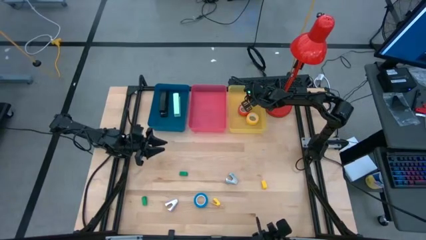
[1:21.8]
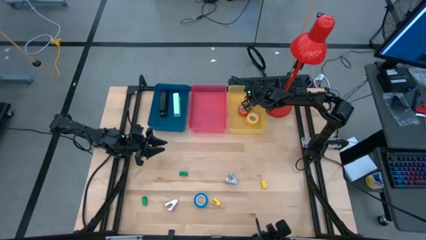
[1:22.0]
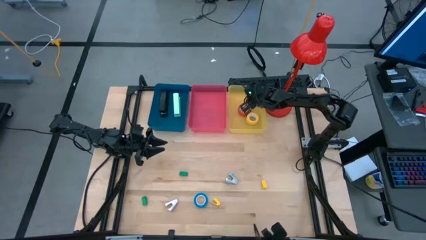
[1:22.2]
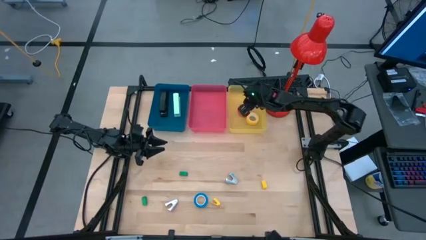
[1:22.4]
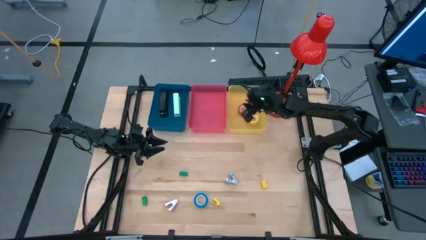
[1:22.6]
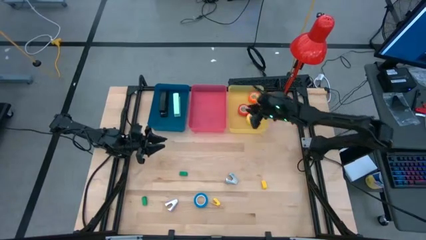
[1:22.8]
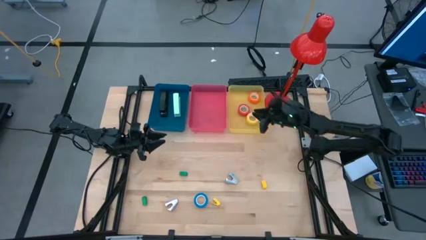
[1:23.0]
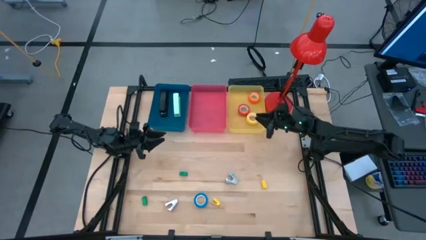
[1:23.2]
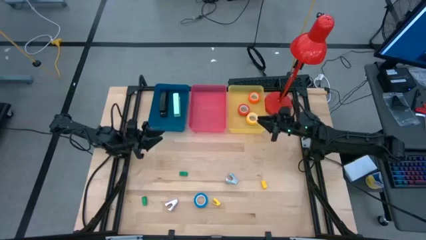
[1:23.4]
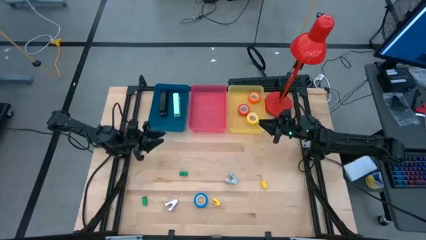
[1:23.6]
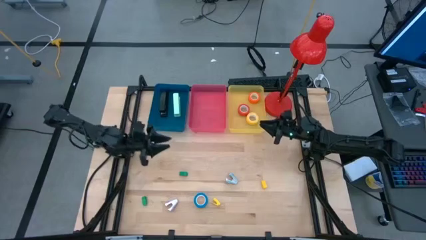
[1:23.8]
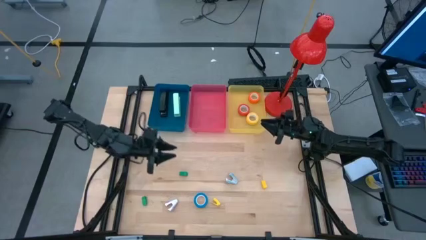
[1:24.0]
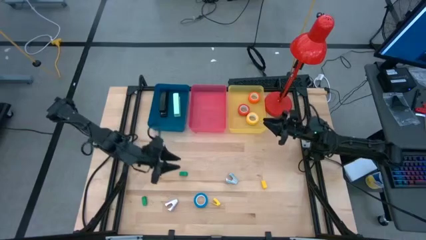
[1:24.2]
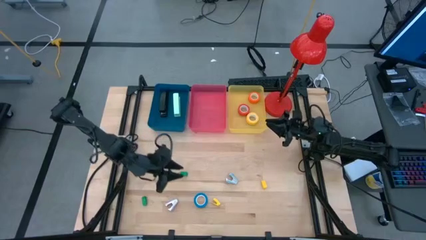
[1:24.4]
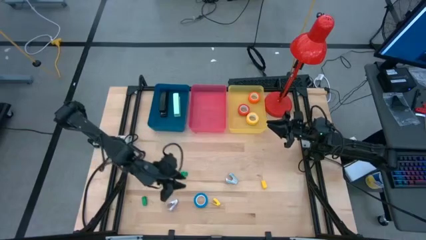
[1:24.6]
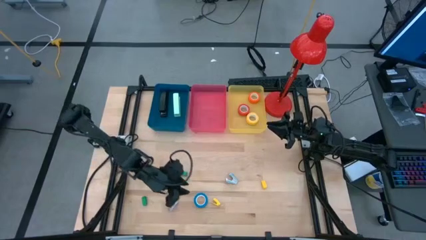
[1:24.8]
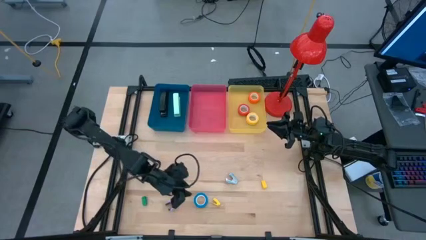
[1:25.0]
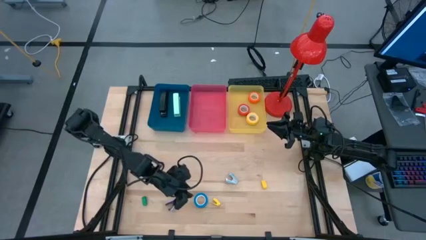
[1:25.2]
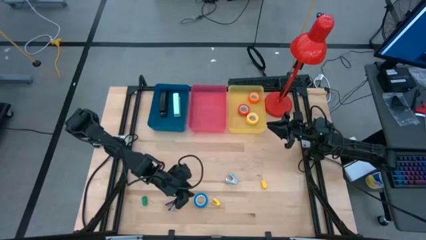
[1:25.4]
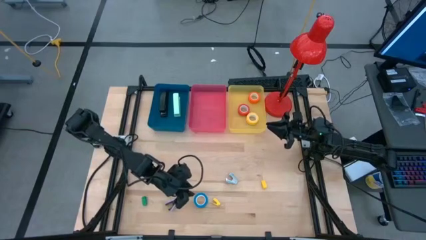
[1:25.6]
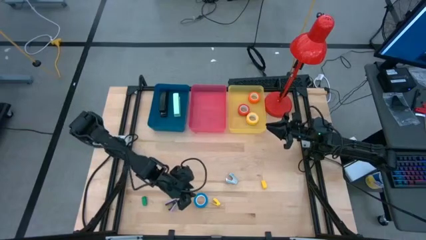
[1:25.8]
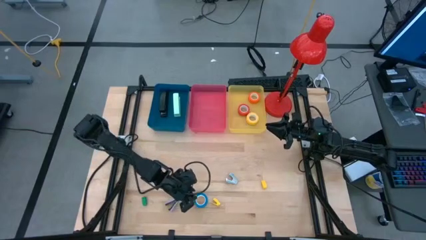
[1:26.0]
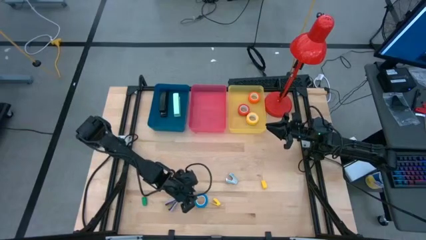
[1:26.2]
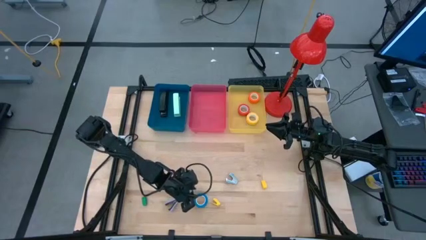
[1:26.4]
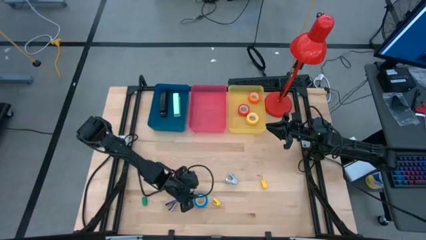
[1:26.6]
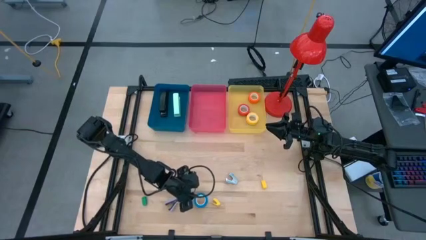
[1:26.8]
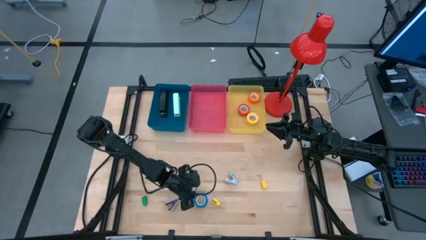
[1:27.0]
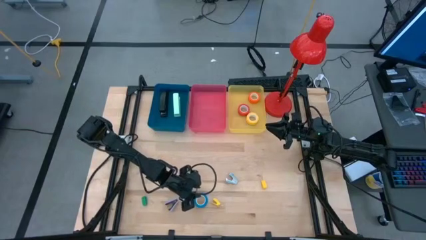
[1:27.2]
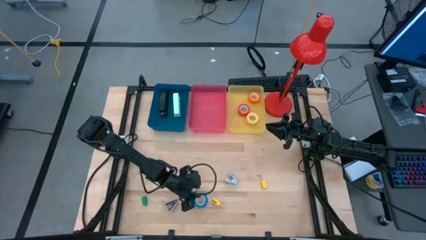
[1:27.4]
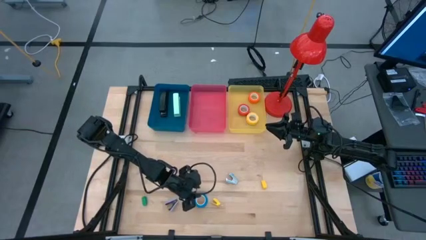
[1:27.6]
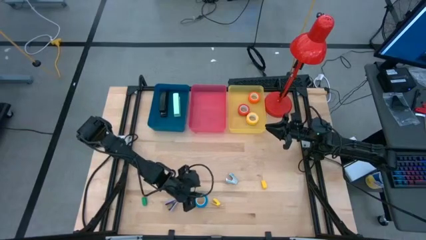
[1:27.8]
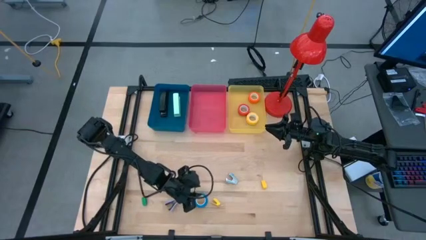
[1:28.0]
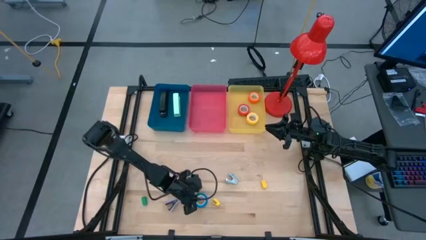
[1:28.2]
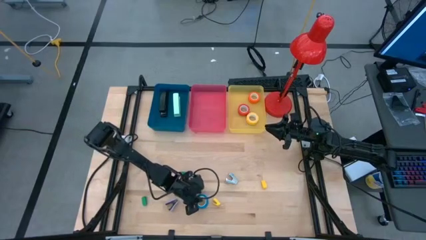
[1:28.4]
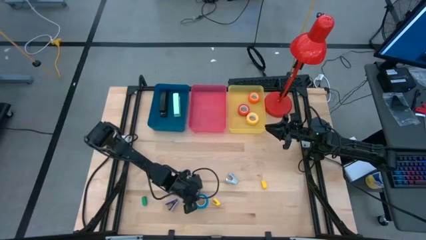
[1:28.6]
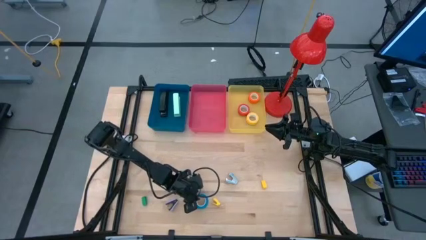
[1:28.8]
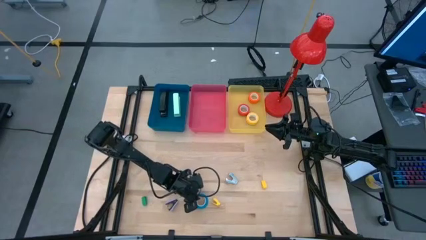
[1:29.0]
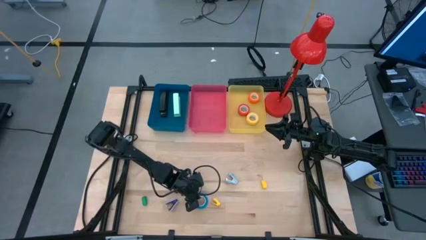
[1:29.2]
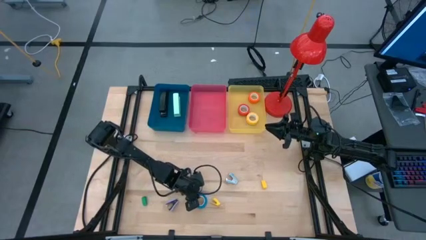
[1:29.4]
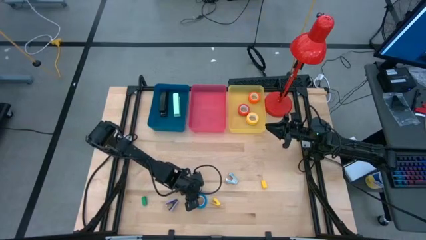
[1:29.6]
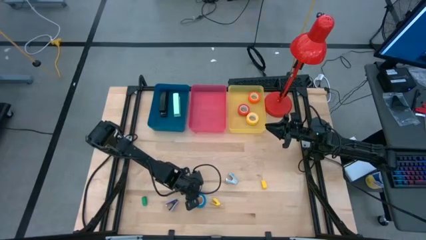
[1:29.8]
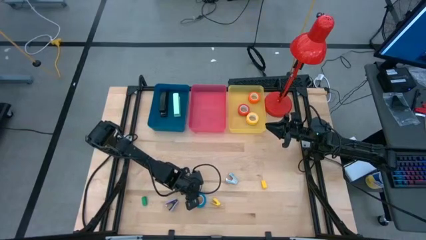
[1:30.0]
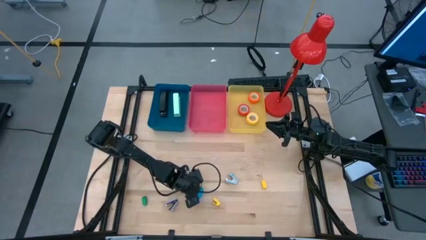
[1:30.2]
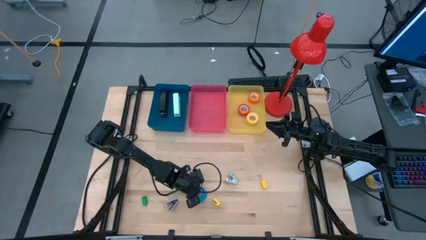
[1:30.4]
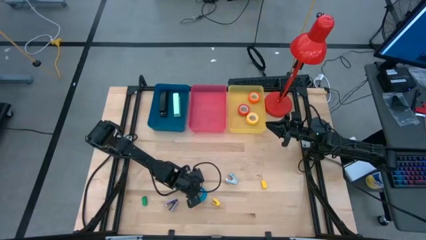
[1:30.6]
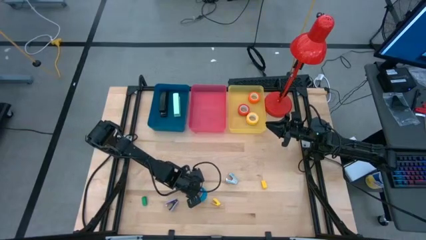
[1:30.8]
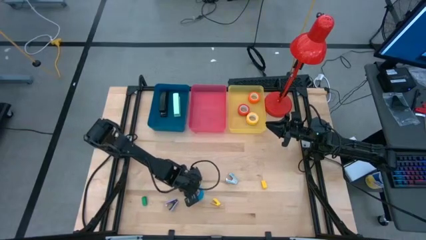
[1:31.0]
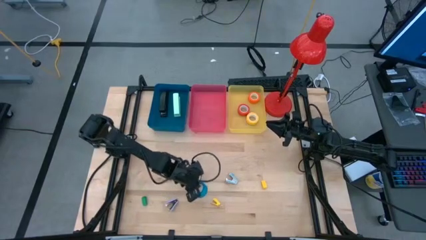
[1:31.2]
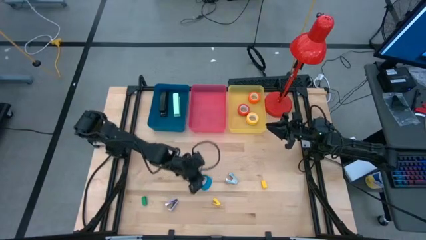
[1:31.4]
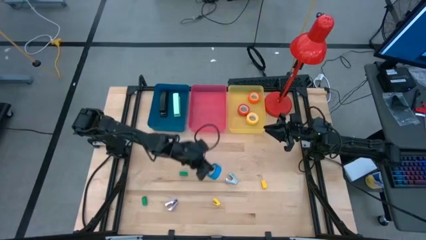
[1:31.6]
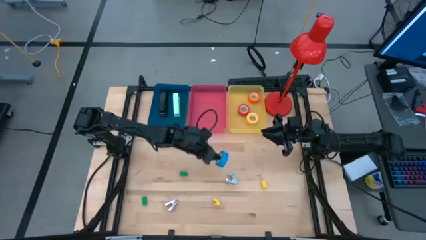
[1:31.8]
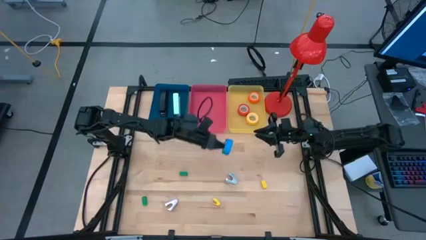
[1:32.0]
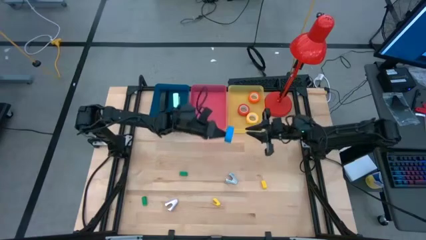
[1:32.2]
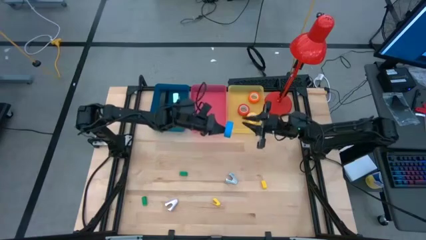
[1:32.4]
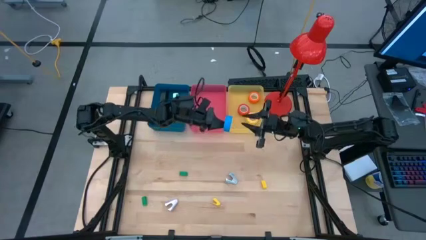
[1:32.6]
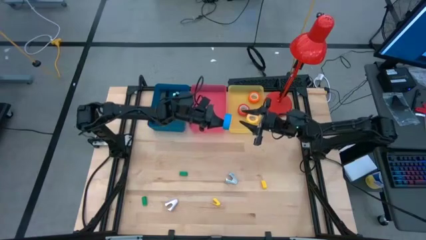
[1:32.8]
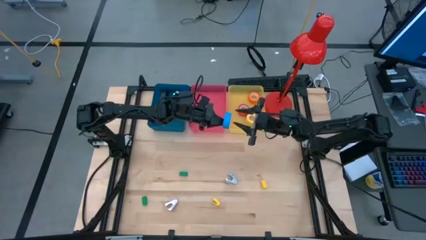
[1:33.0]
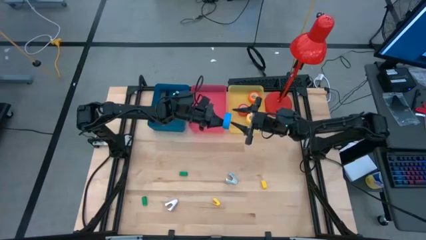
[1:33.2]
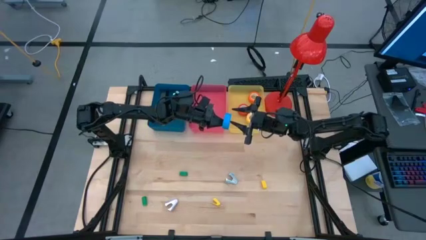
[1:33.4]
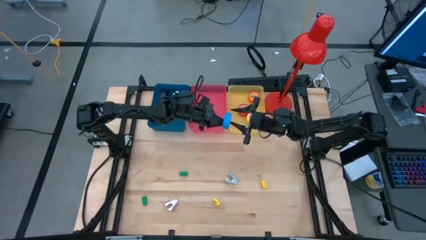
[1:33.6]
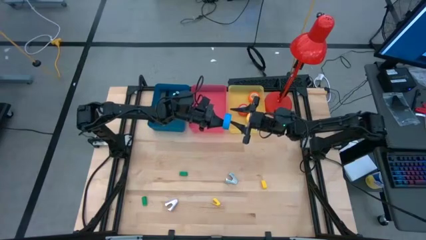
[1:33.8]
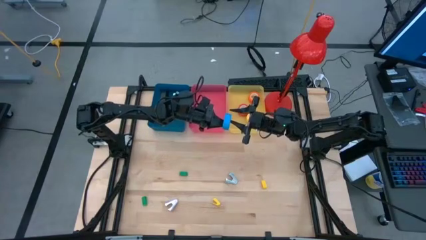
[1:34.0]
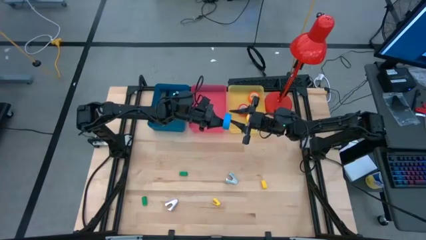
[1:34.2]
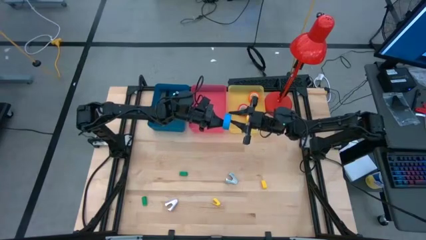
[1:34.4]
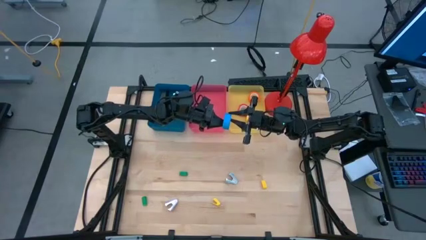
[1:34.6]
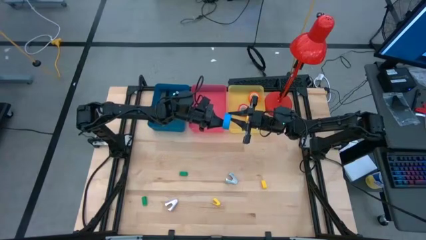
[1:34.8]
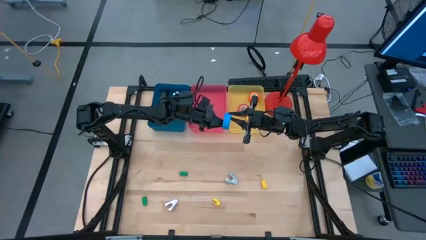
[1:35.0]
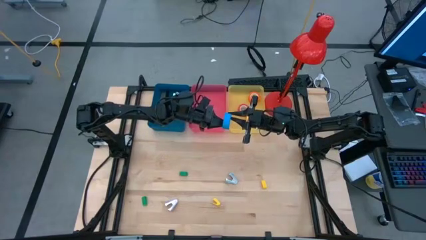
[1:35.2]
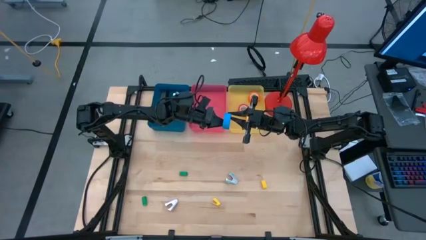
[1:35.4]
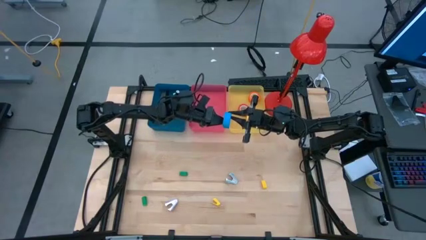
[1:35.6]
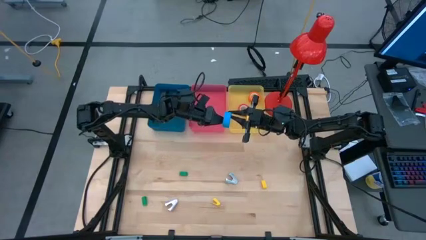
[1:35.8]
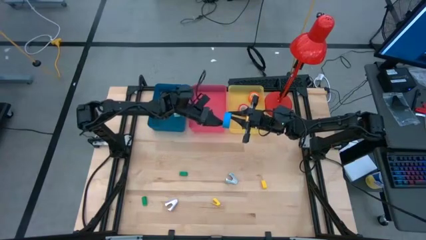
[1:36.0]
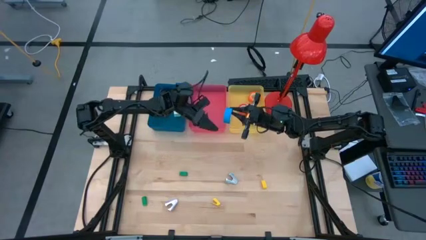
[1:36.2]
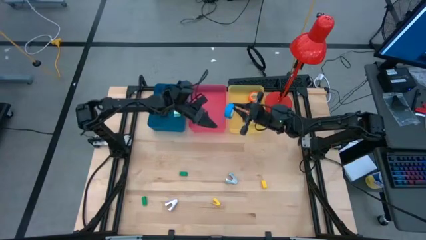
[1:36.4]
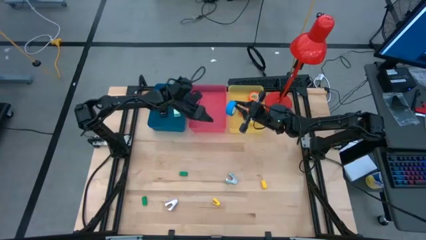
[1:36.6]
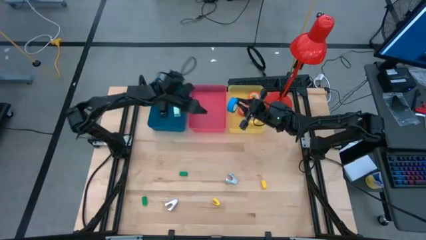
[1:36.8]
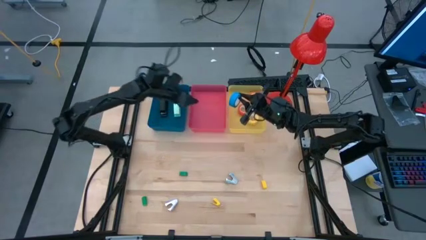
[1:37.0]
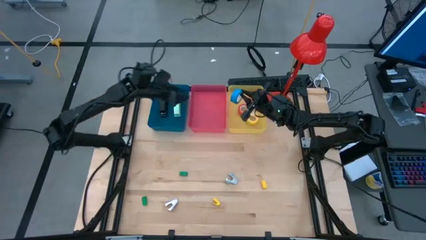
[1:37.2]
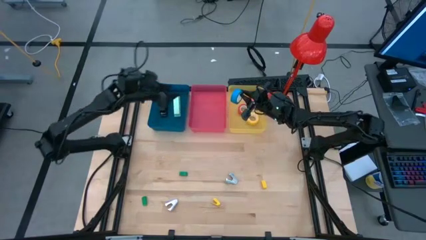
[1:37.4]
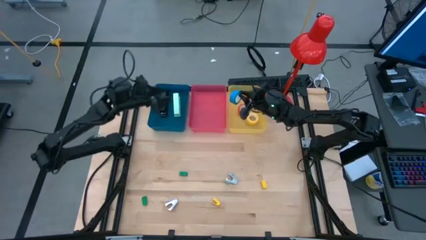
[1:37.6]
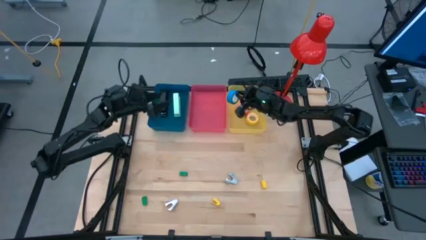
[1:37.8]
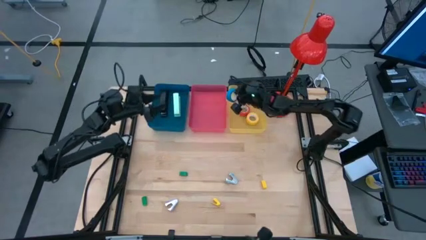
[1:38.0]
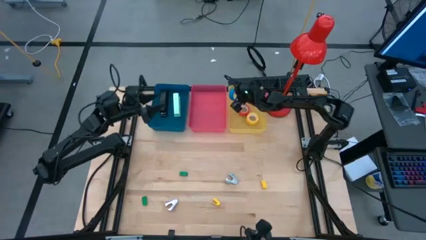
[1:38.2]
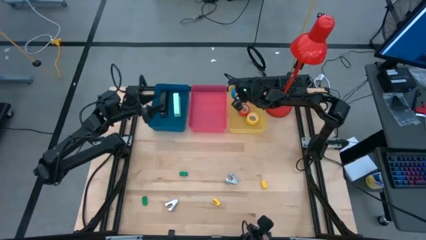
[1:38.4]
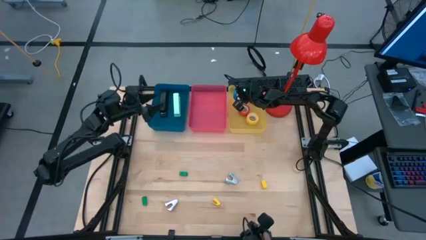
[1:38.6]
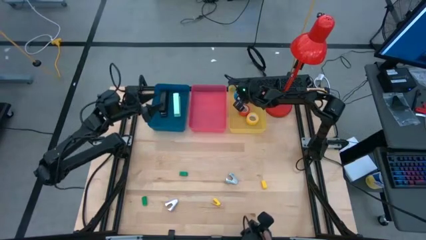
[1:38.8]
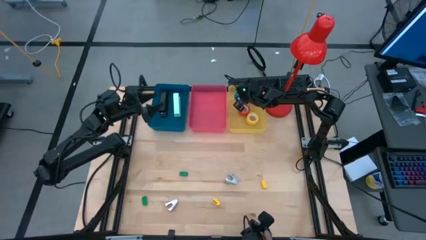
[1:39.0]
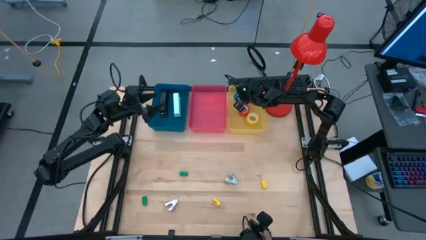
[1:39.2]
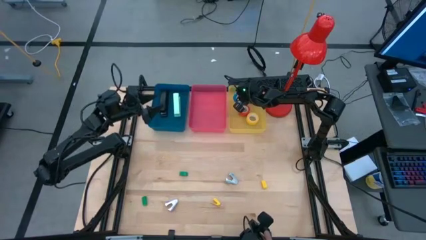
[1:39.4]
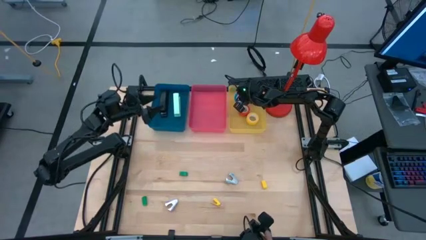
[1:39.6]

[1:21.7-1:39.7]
Task: Pick and place Stapler, Stapler remover, tape
Put the blue tape into the yellow bin
